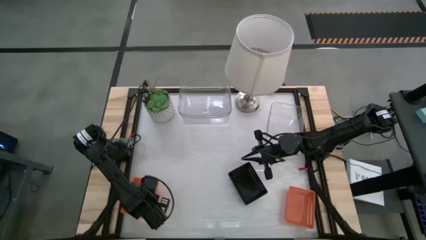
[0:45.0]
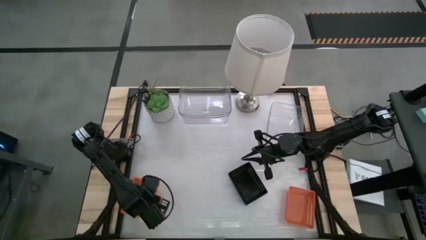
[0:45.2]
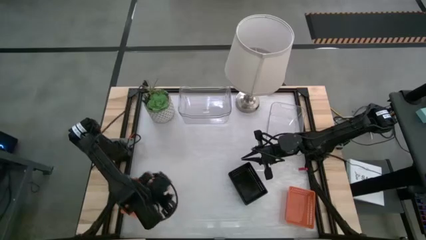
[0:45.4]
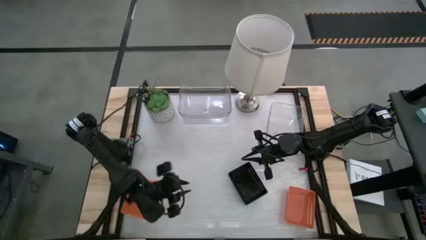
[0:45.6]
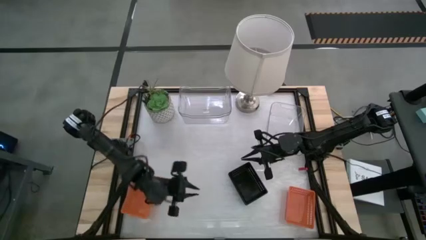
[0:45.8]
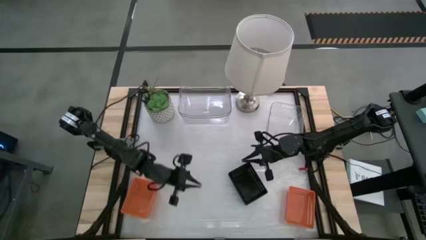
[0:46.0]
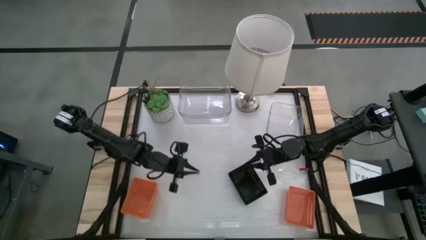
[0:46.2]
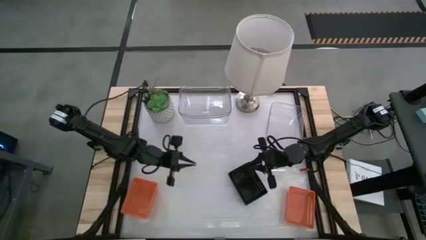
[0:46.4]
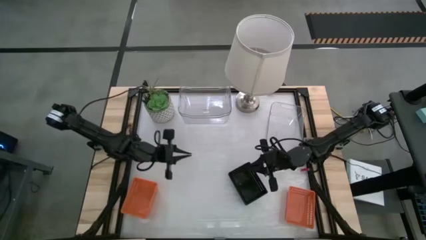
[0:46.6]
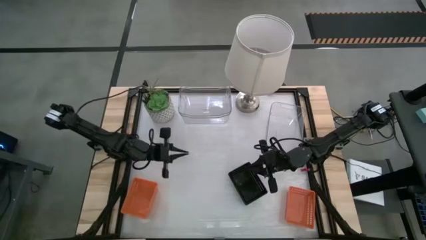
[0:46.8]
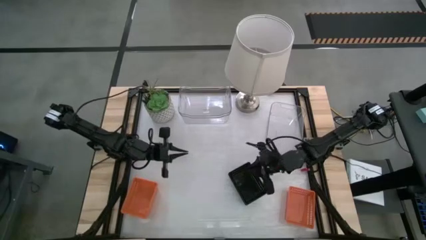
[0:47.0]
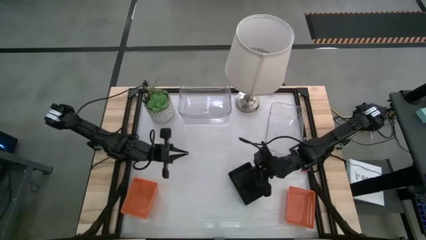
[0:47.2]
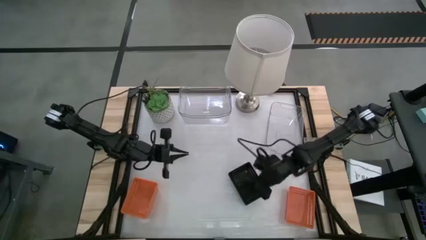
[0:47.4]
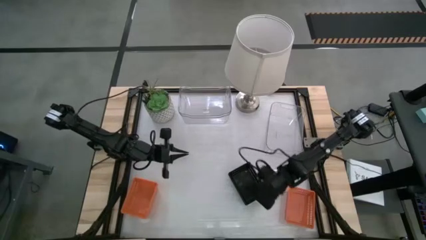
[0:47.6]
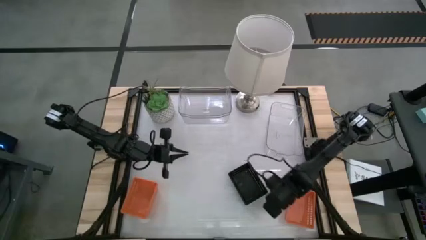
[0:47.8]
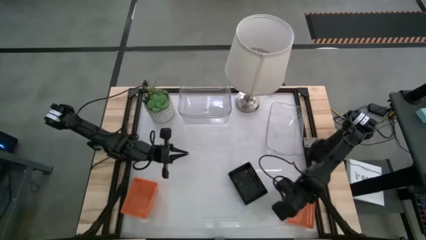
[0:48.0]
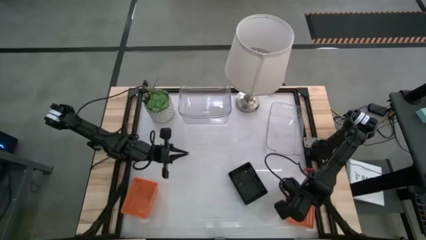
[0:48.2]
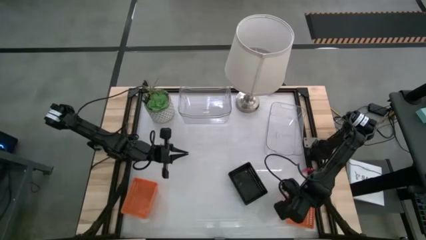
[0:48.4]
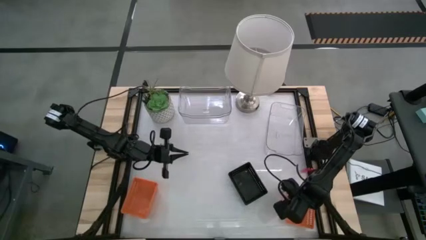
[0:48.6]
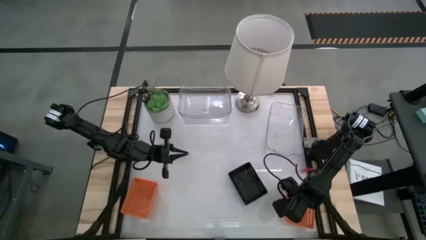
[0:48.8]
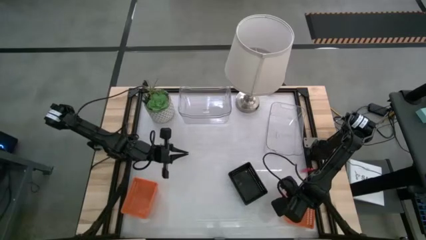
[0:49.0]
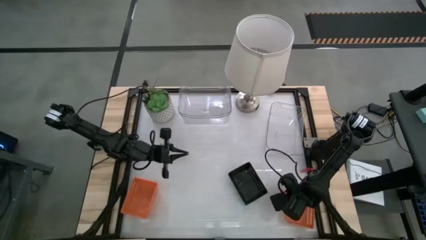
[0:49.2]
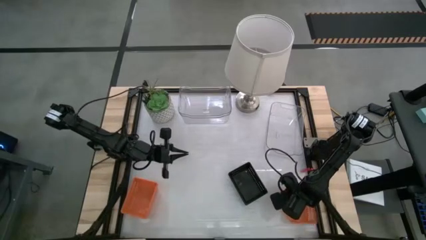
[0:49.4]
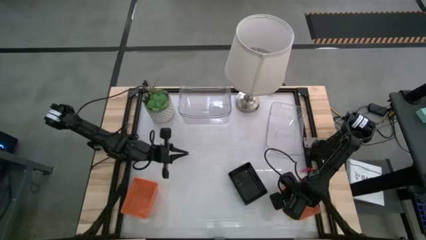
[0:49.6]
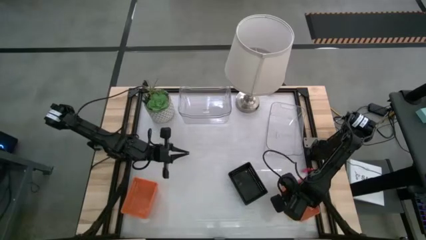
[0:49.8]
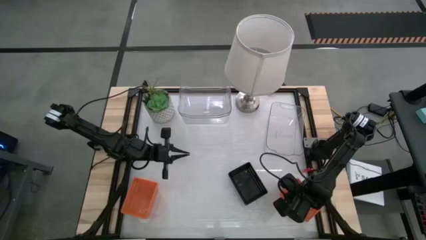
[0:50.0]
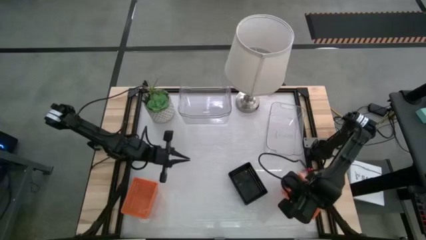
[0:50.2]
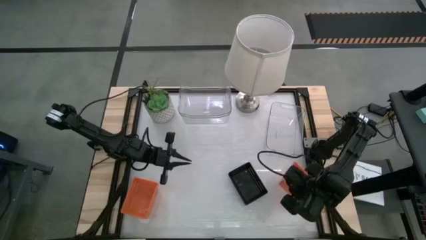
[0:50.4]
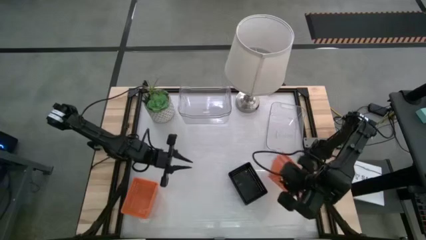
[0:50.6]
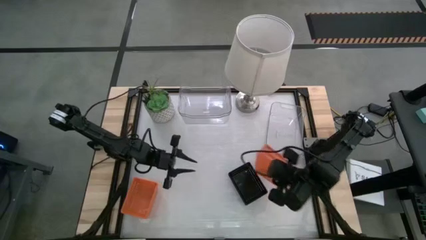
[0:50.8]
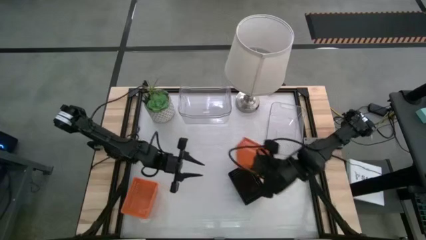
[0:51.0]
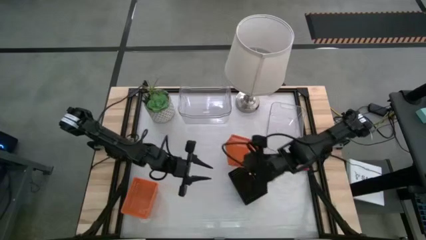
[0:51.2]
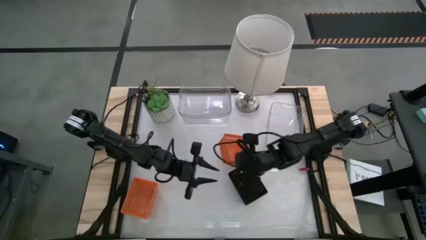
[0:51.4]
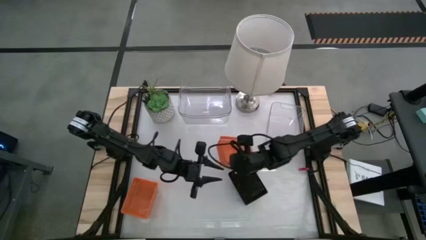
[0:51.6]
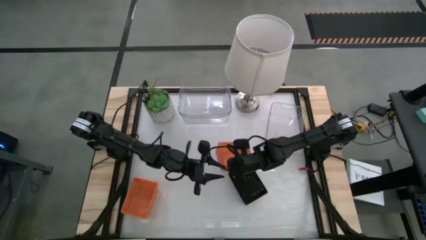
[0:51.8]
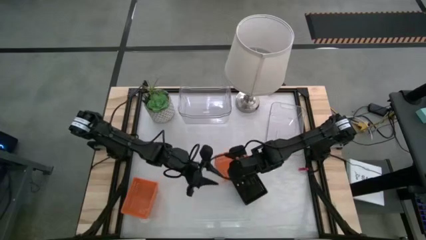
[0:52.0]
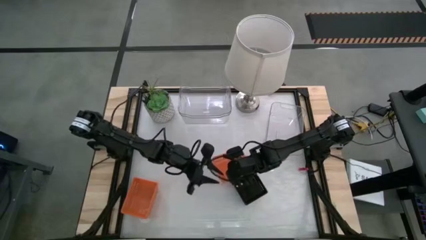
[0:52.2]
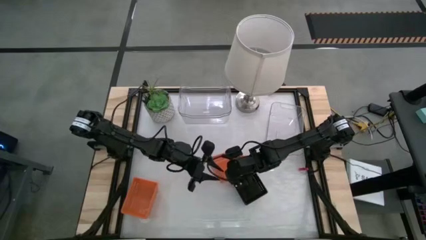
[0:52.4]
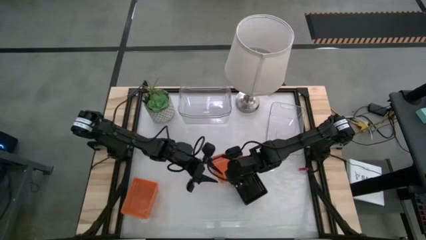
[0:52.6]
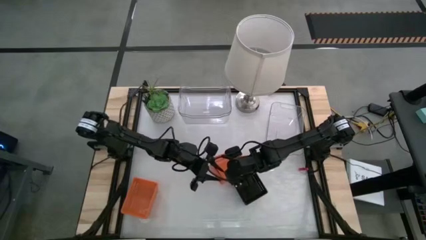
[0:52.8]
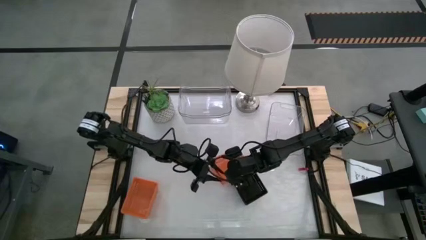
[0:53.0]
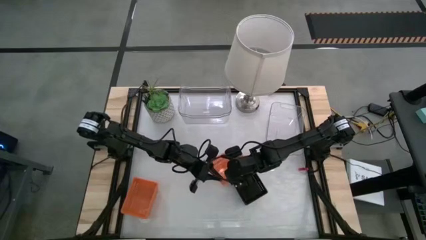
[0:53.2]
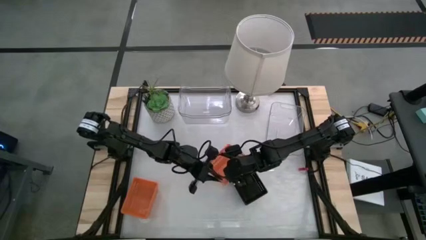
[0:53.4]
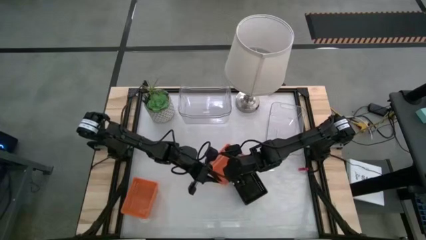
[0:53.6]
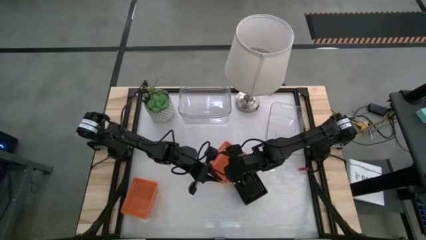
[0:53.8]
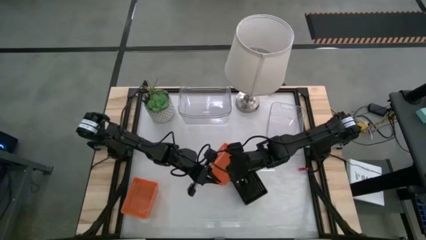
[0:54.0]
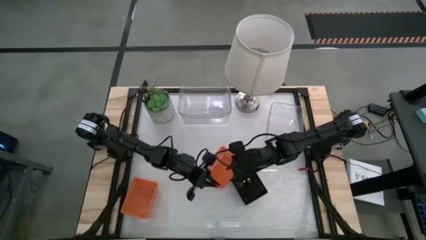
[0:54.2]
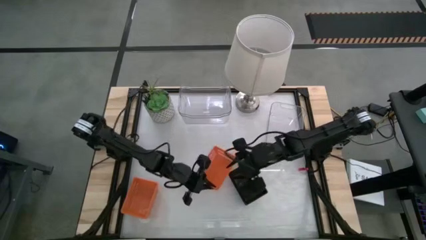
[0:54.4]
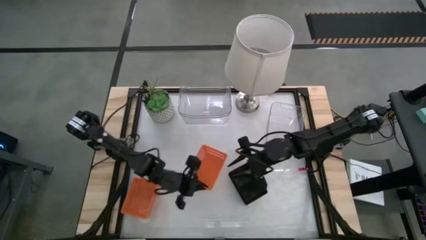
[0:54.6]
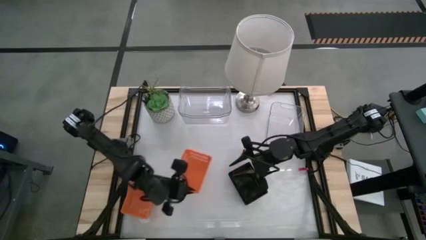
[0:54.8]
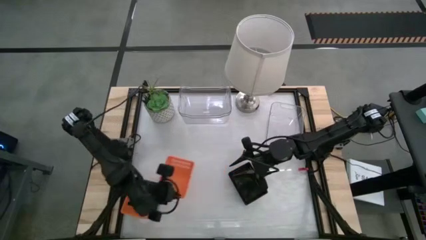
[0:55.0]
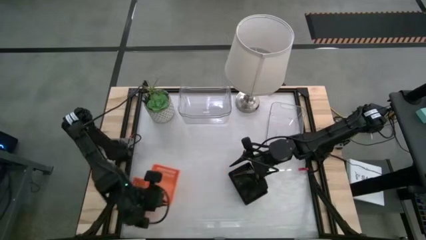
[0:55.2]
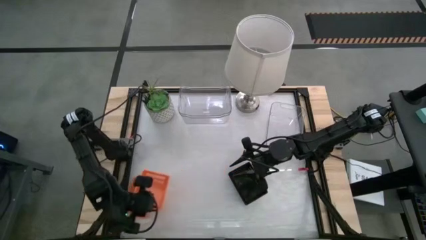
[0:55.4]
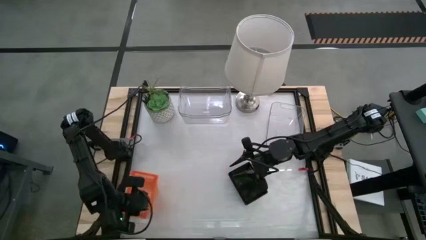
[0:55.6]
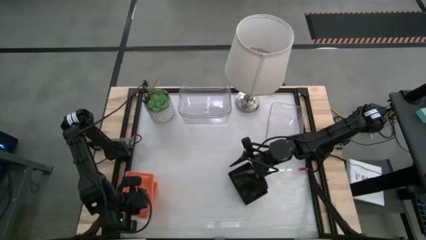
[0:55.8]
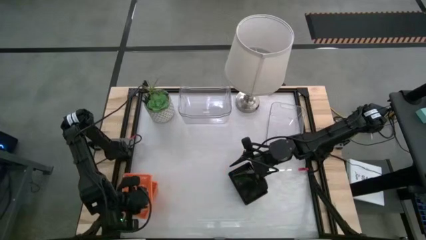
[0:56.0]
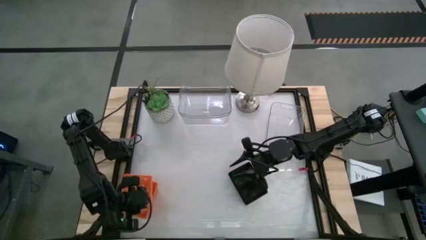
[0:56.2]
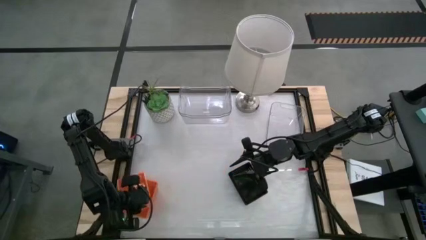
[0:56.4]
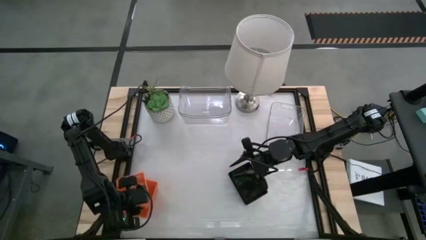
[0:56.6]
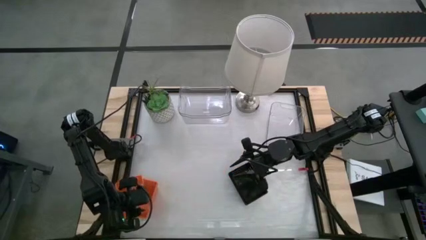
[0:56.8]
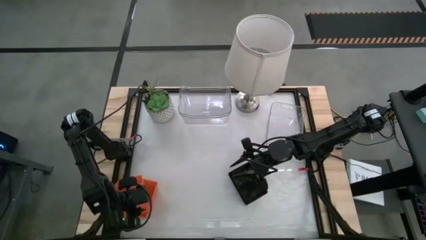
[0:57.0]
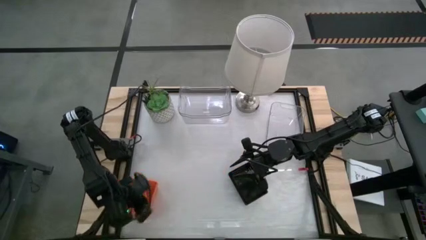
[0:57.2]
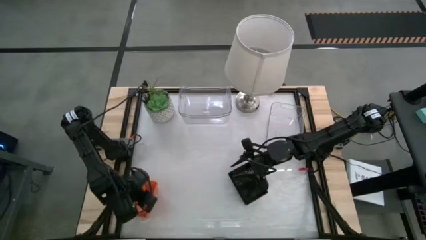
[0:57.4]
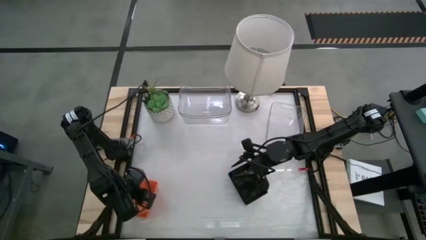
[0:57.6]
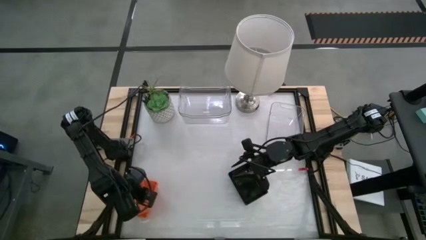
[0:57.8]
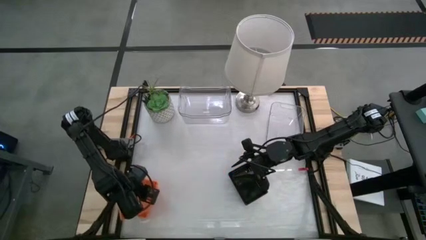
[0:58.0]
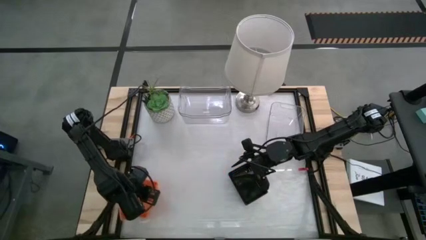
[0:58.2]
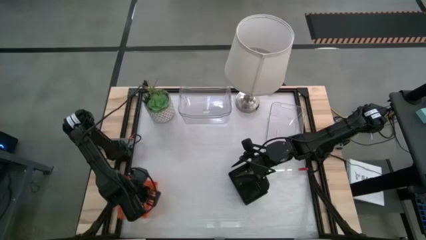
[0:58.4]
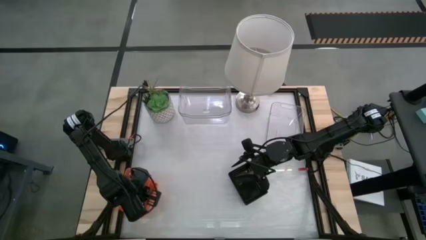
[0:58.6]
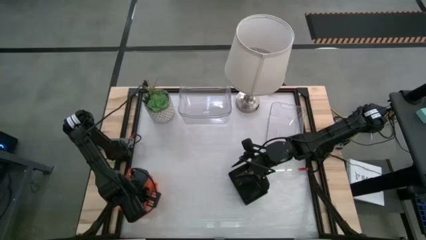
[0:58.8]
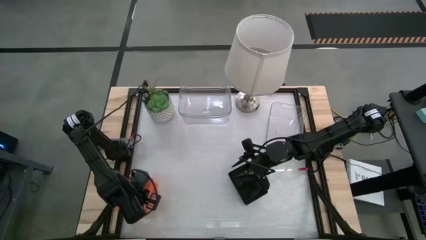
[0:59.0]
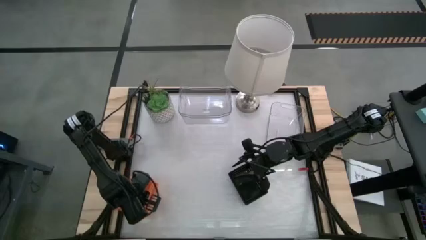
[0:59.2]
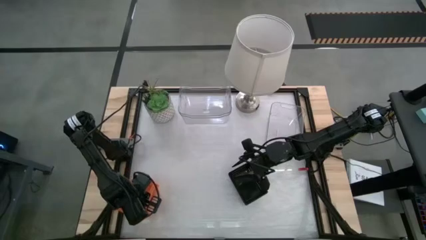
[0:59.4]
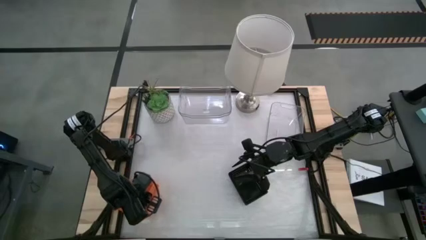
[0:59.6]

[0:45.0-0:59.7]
Stack the right orange bin on the left orange bins
